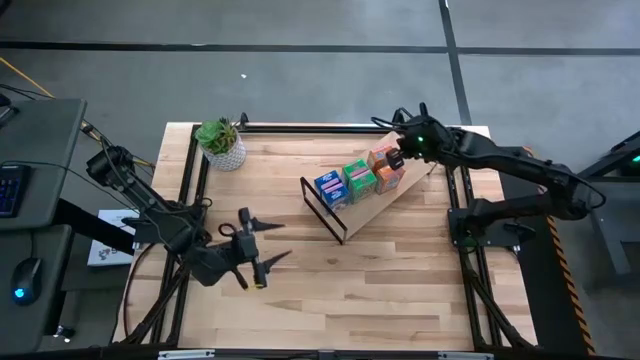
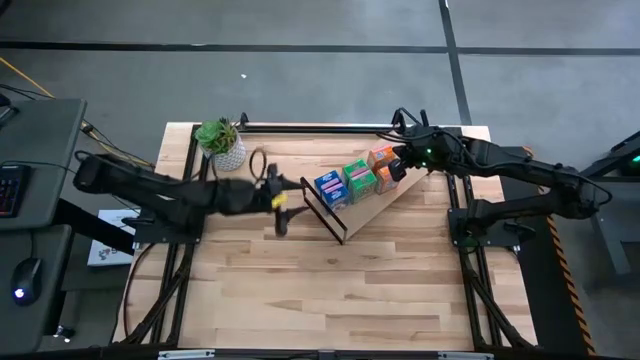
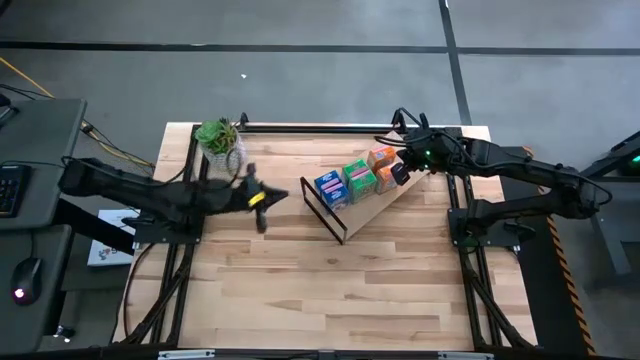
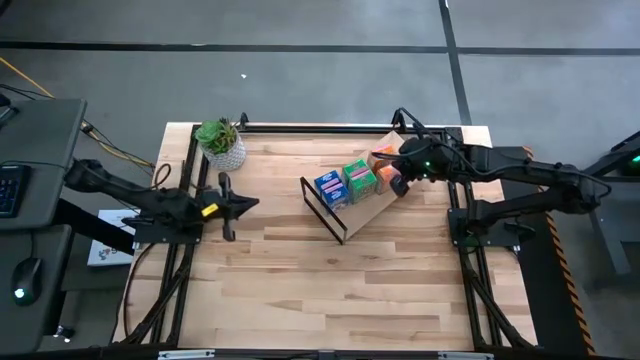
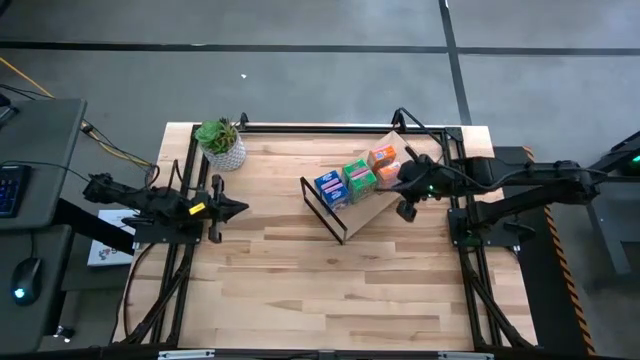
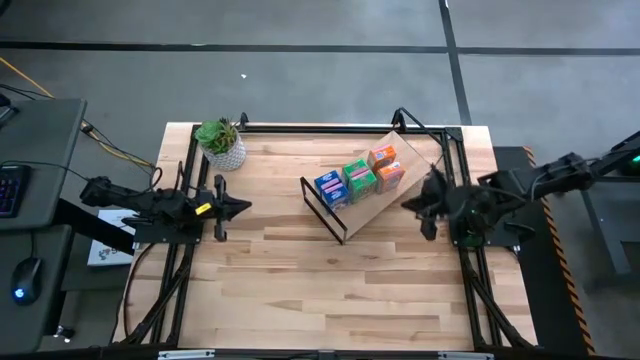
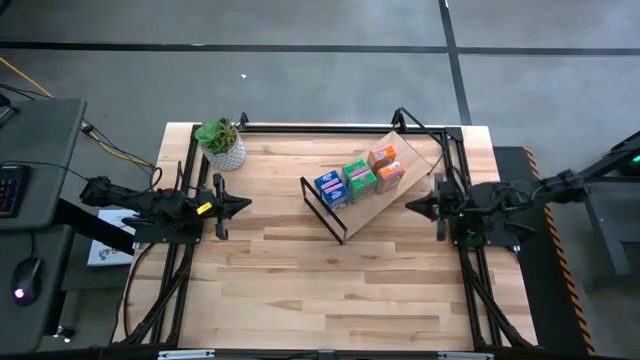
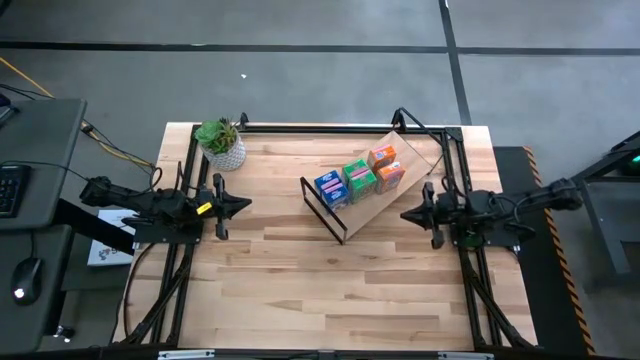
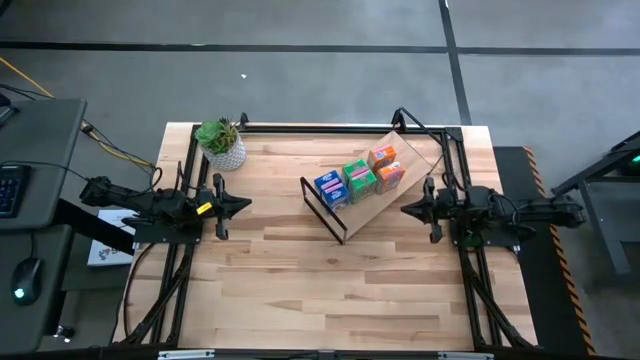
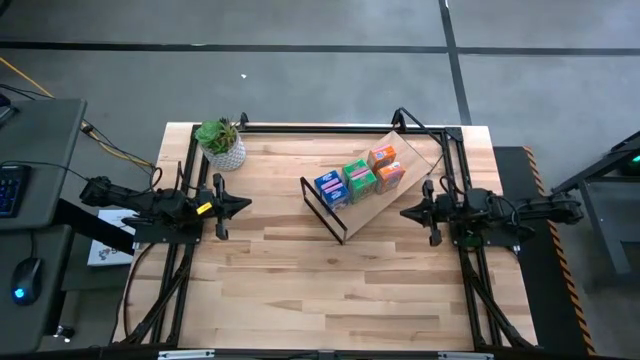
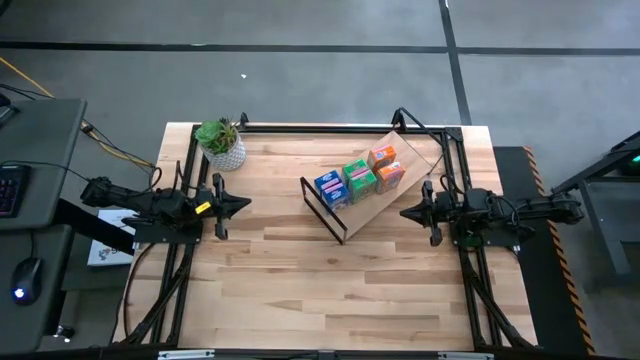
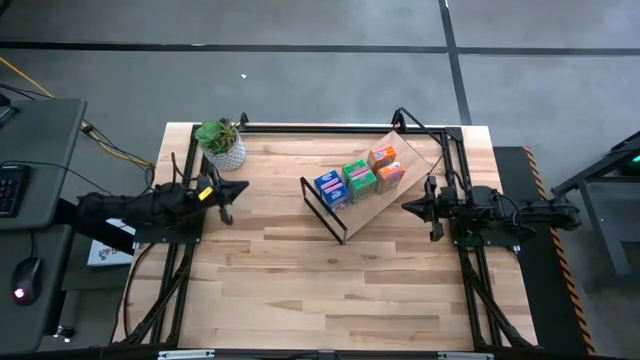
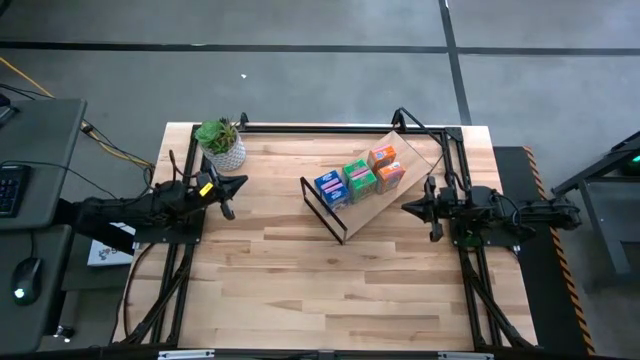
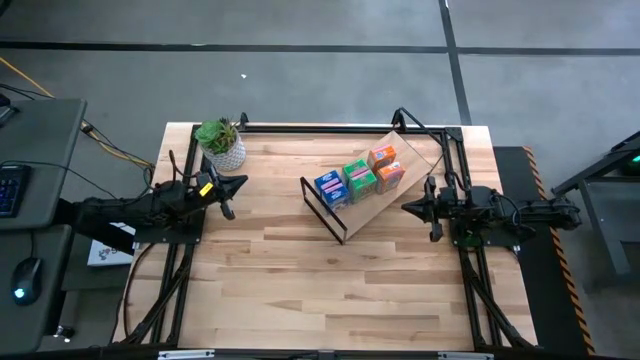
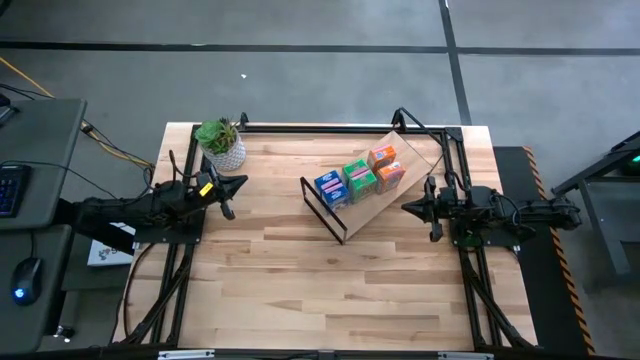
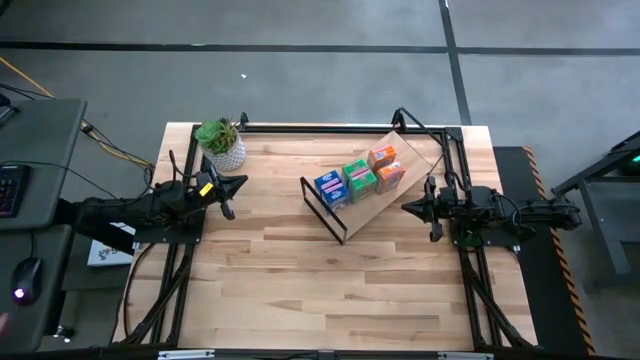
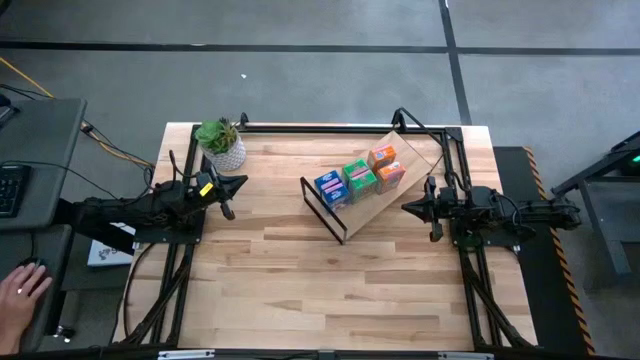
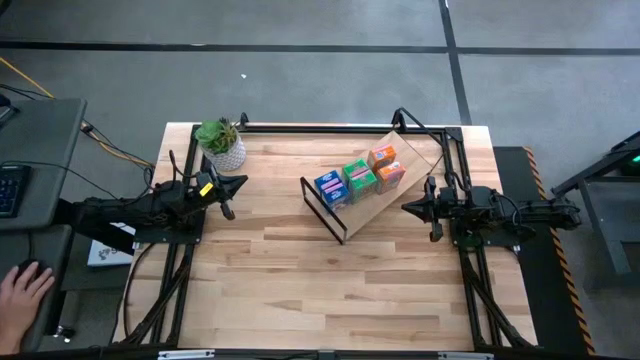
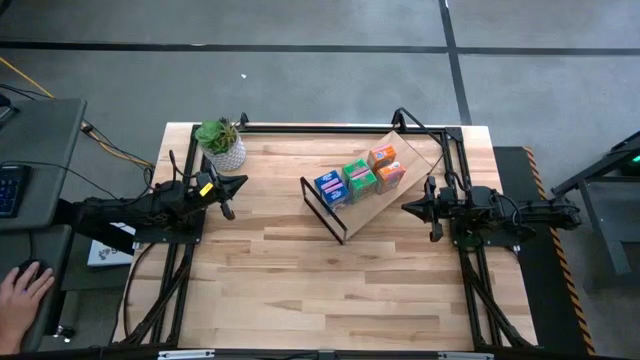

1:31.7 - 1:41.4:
Task: Stack cereal on shelf
Return to Home Position

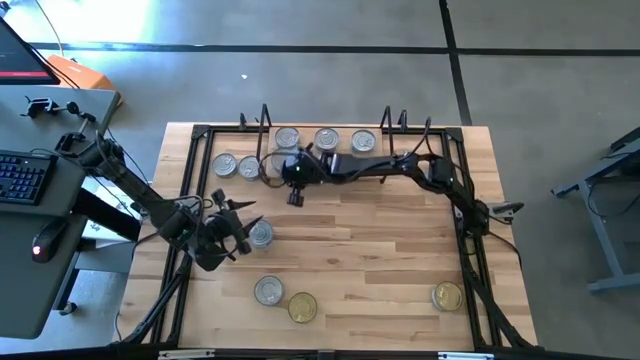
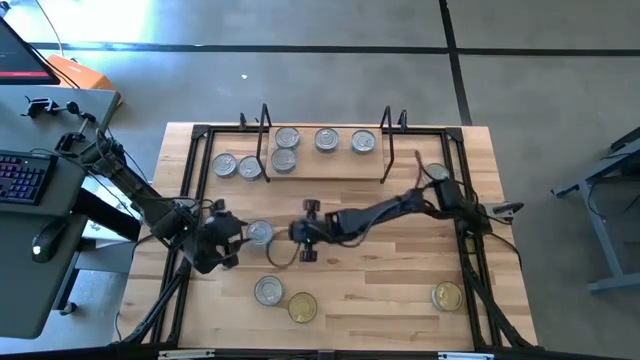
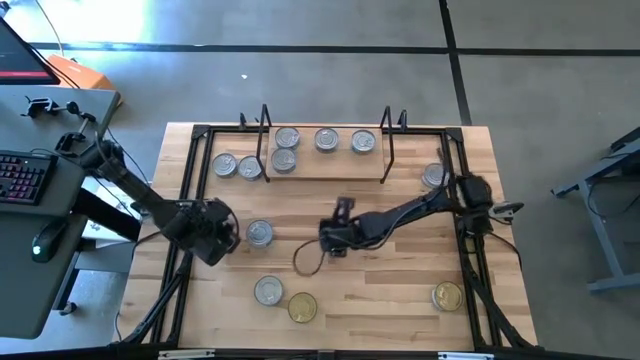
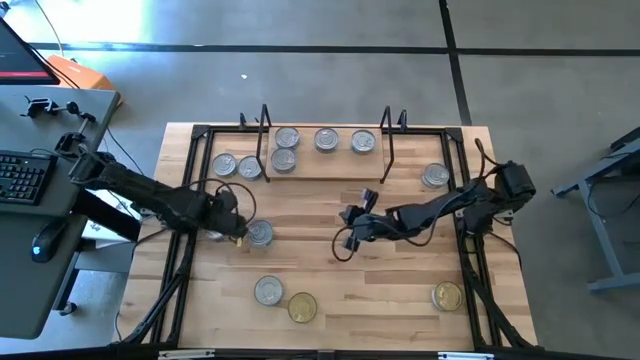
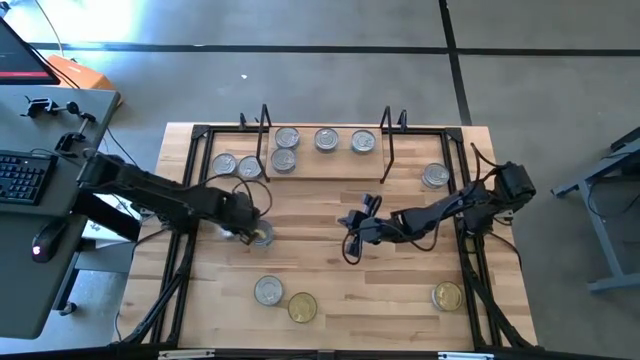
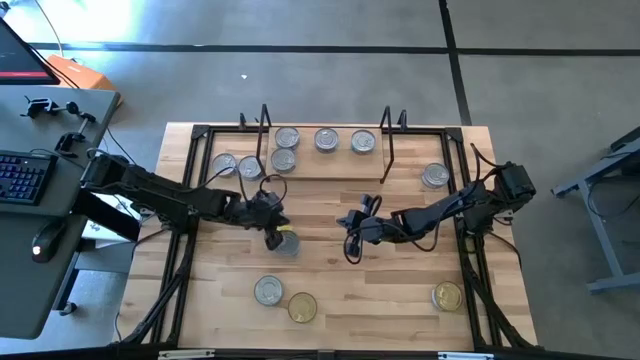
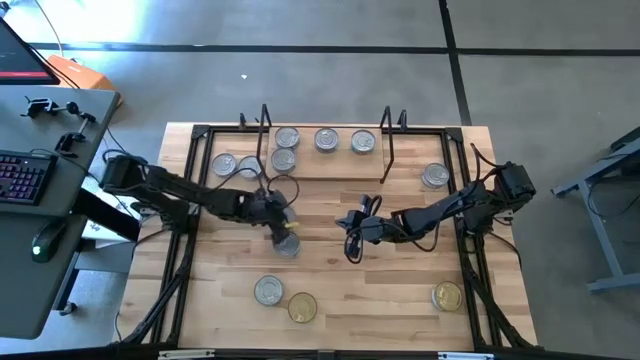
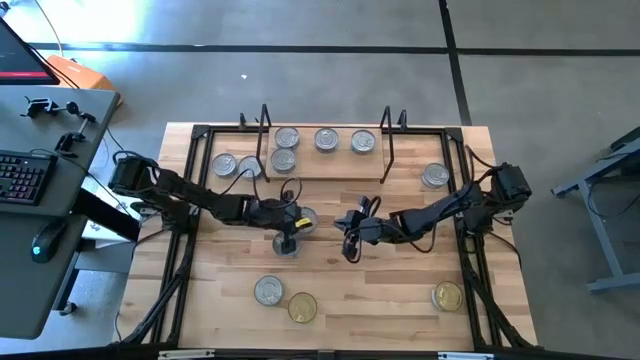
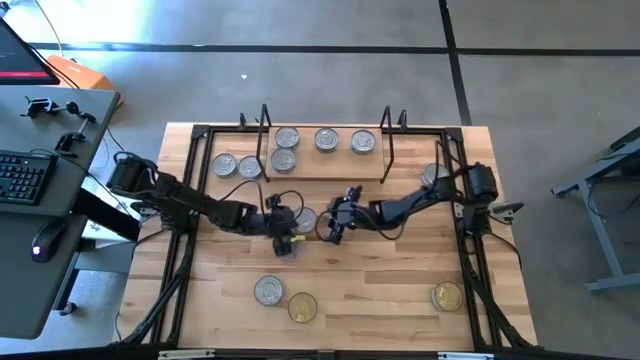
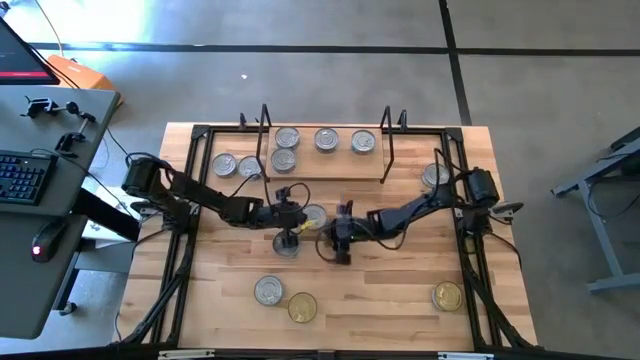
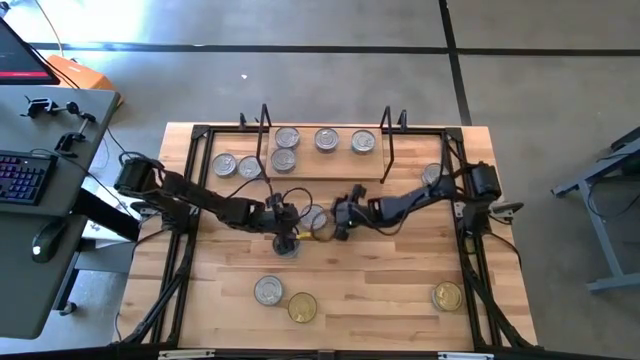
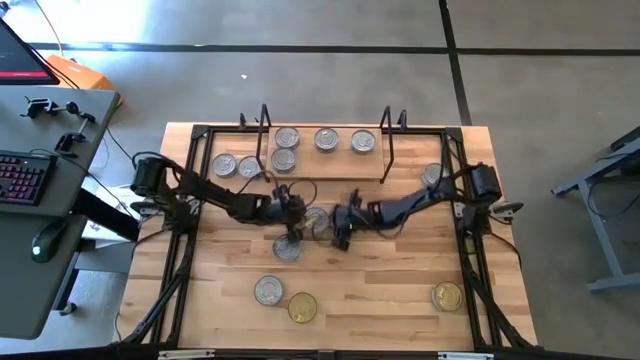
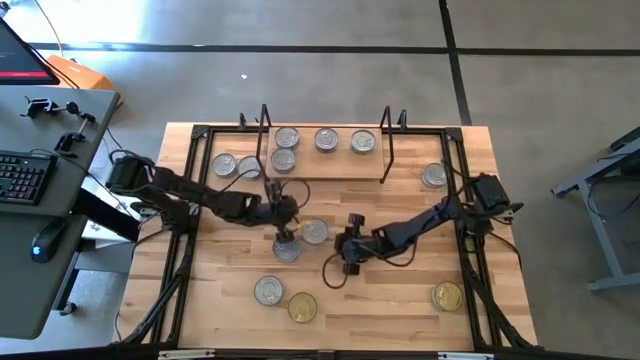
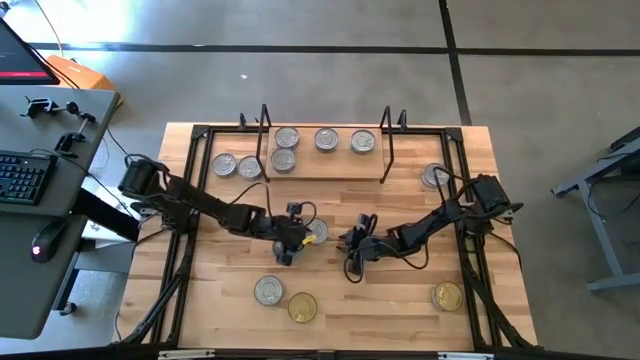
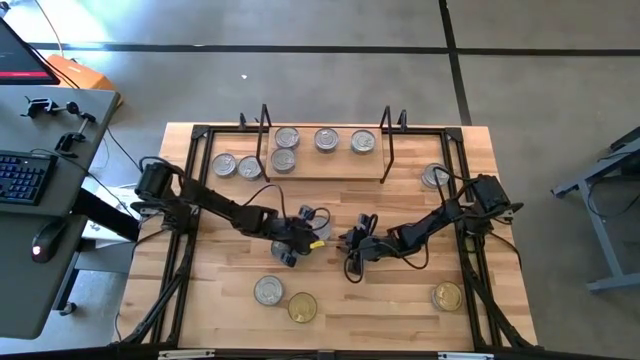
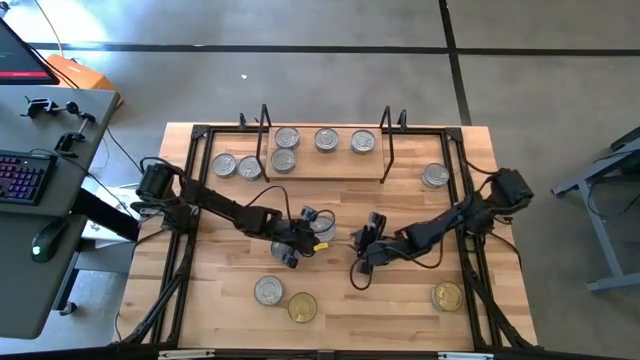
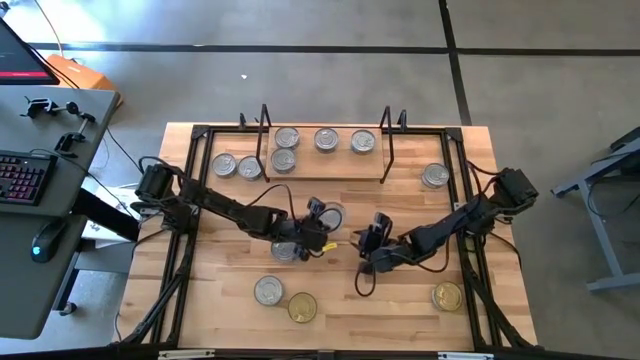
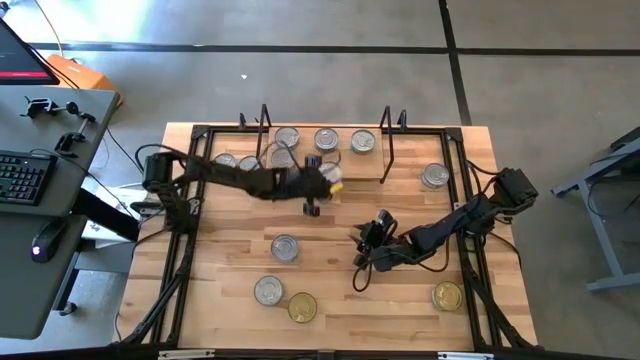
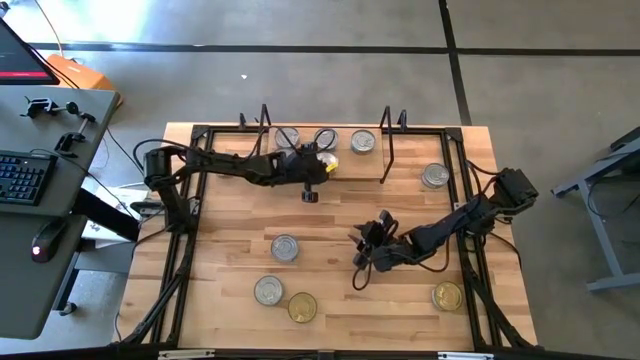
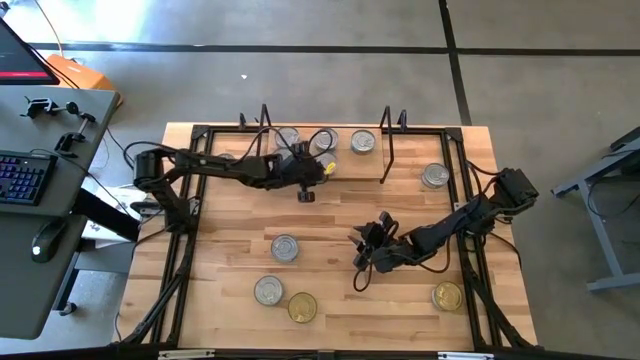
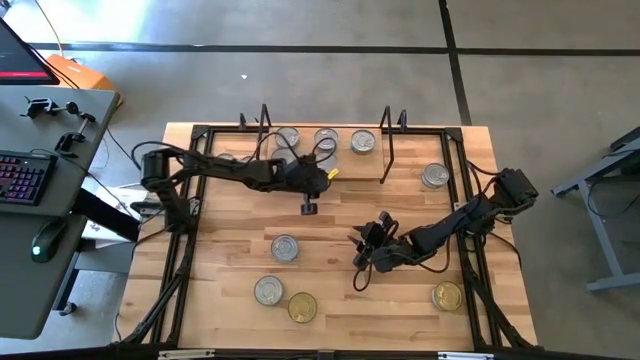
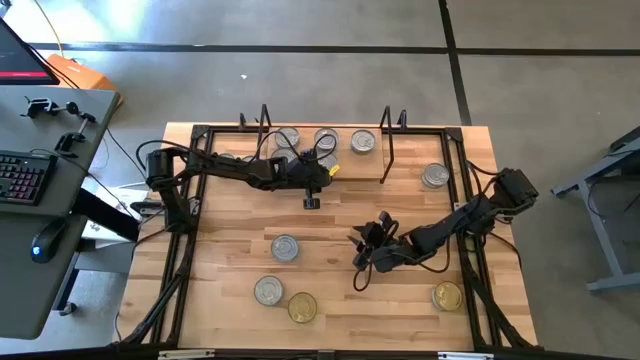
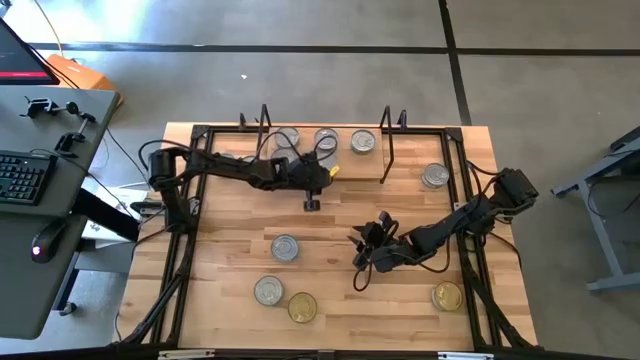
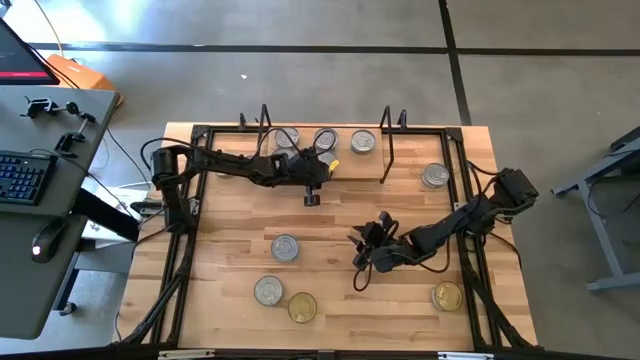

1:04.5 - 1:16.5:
Task: Stack canned seafood by type on shelf
Put the green tuna can on the shelf
